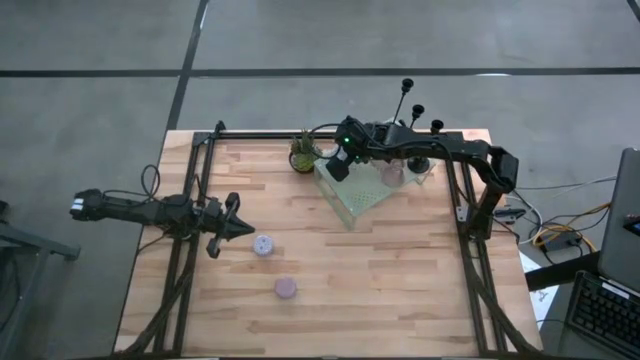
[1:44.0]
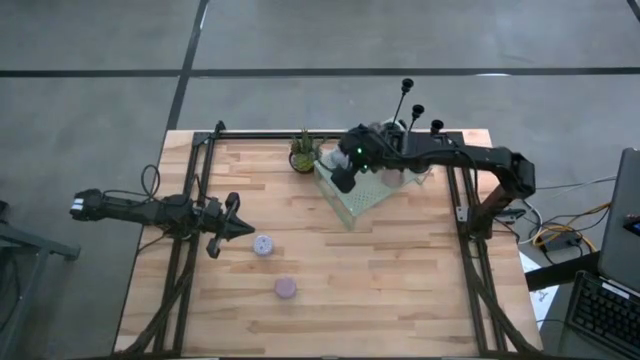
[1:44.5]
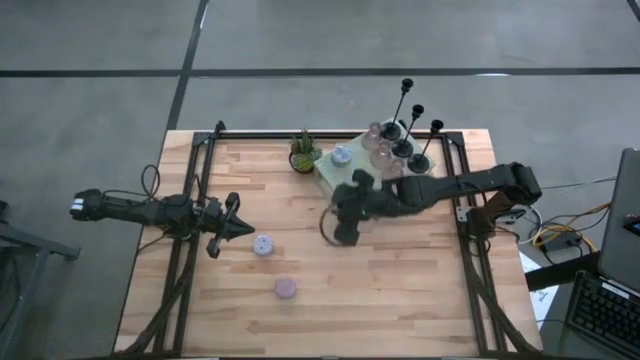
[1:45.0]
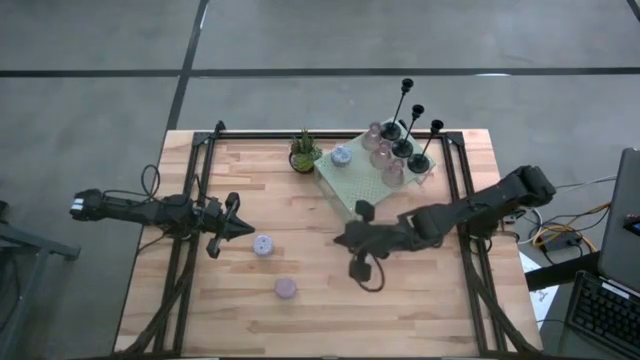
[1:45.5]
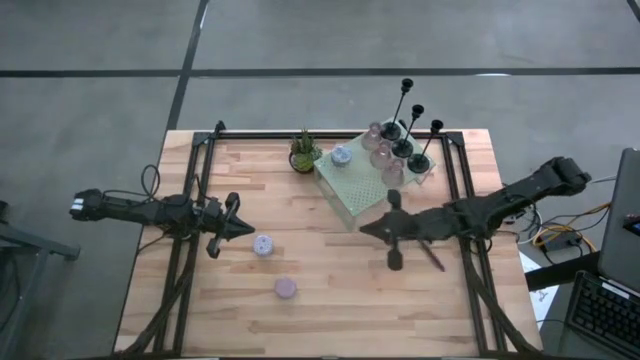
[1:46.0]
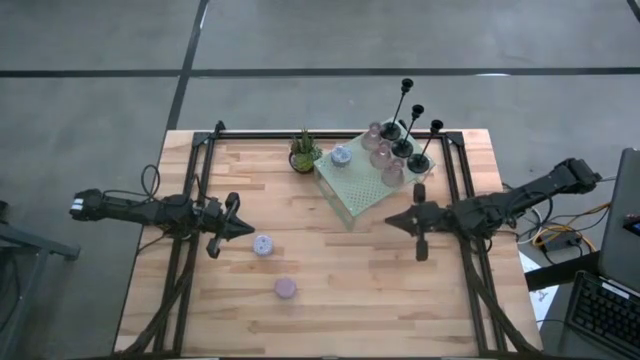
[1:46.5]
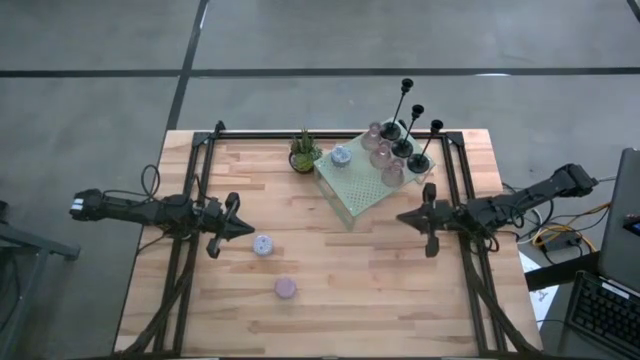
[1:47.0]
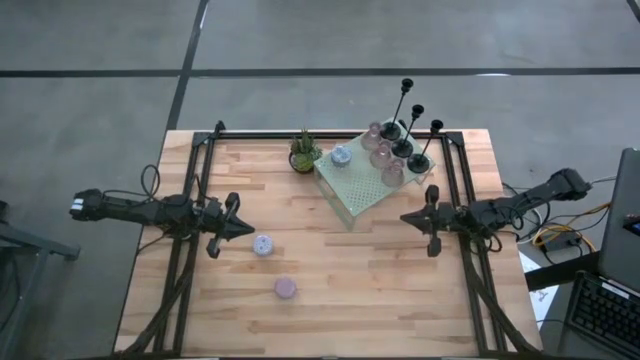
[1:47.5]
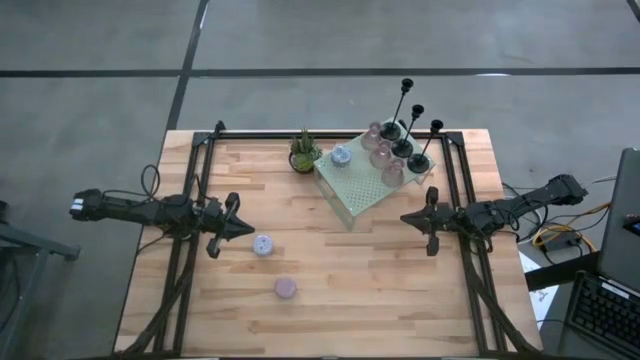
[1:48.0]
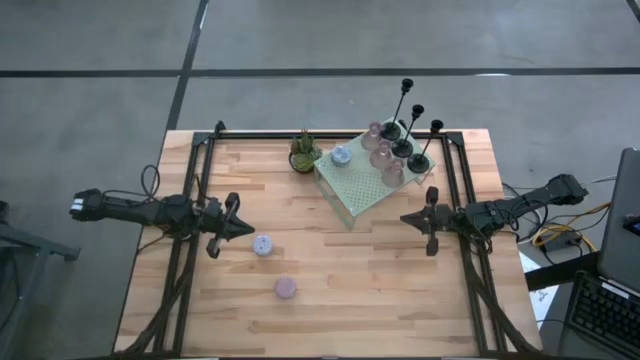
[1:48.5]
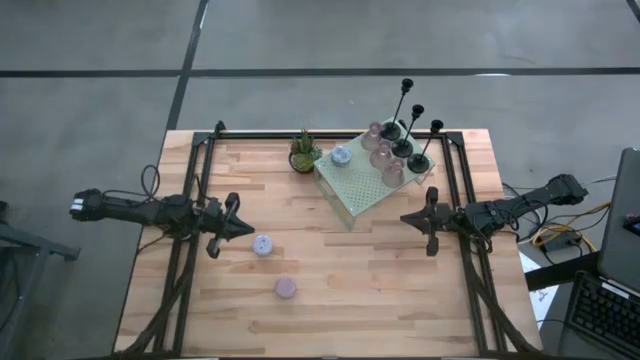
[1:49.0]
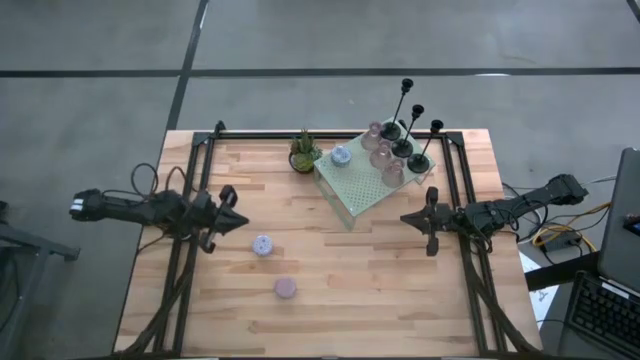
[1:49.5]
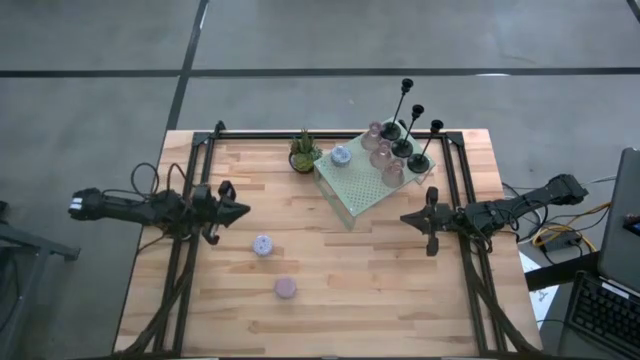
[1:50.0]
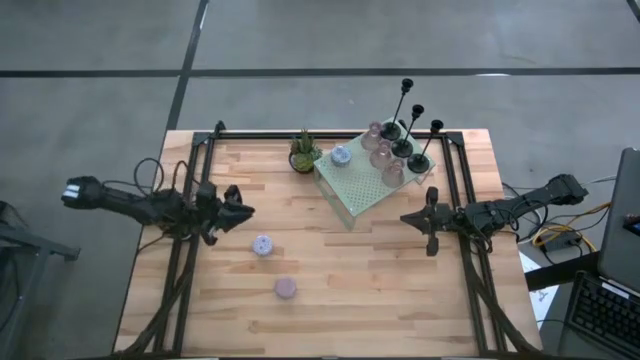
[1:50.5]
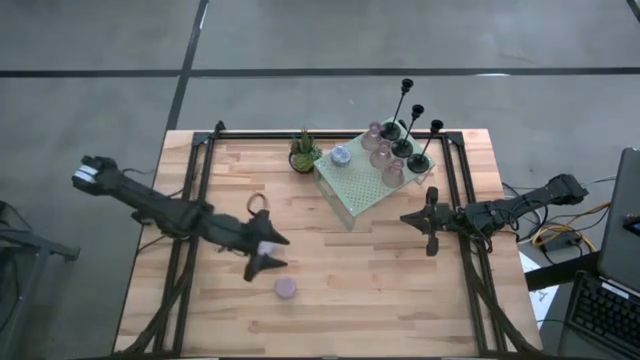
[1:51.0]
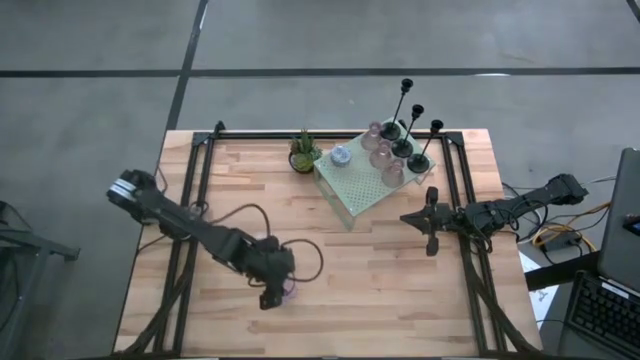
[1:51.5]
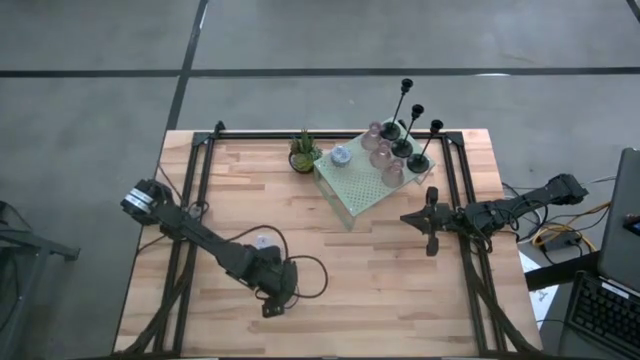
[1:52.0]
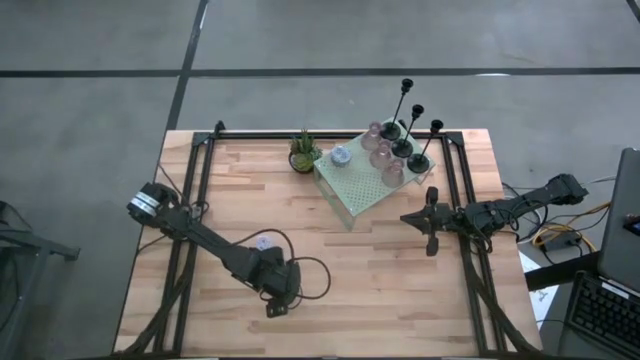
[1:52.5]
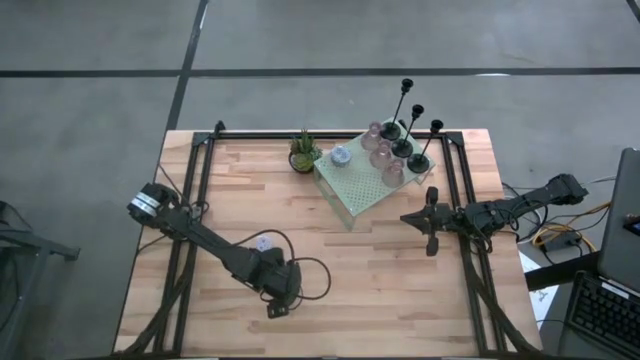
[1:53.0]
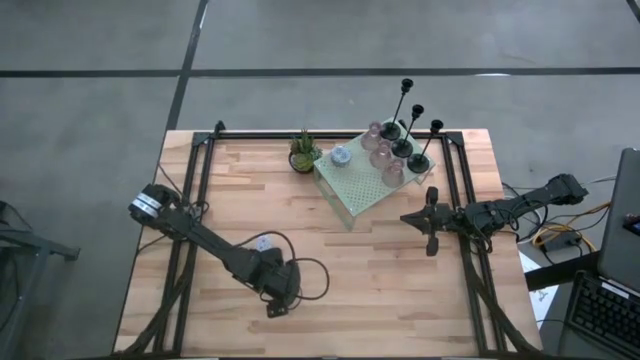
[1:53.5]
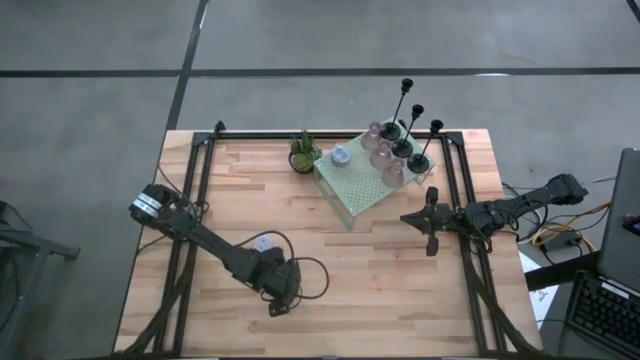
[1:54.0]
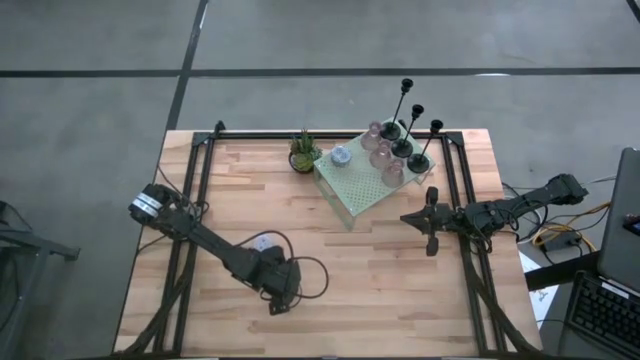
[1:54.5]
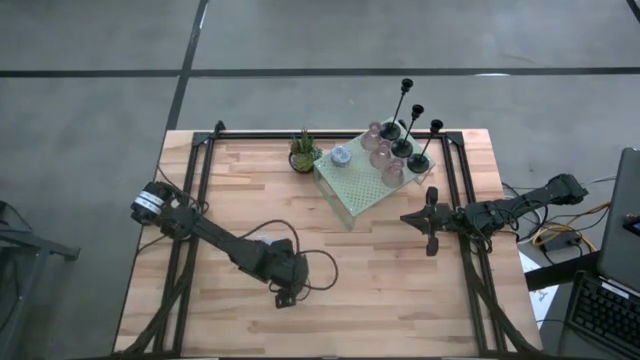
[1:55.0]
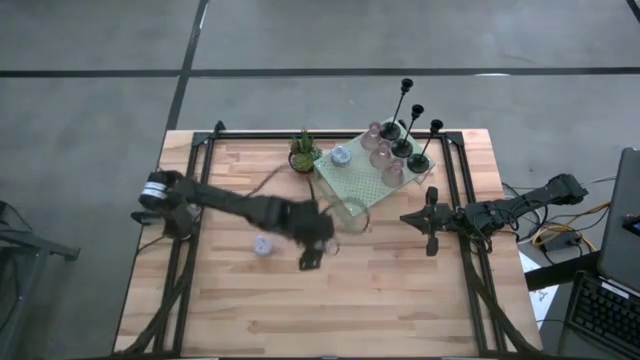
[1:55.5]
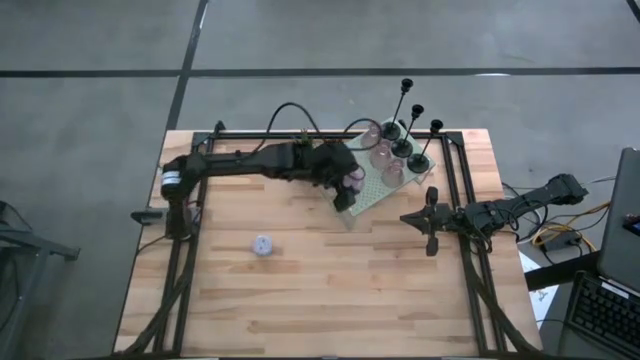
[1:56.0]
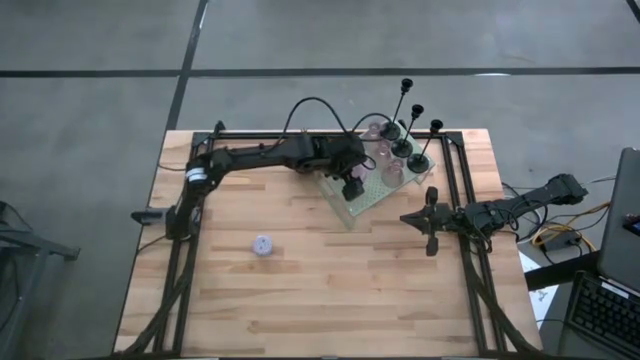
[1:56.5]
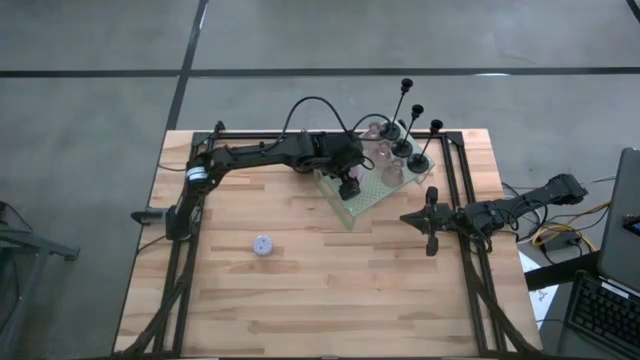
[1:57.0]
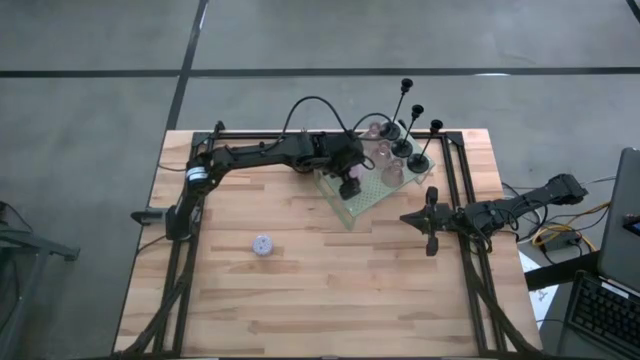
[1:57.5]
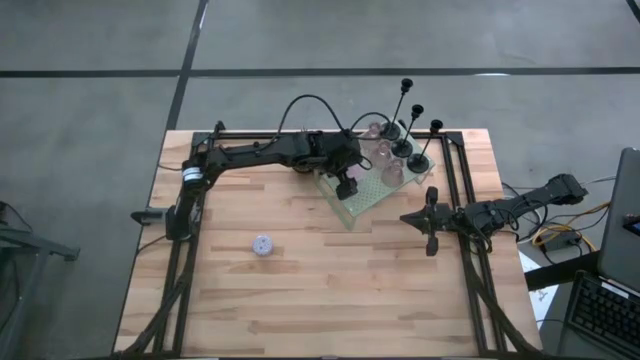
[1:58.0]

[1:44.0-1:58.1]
Task: Pick & Place candle stick holders
Put the pink scented candle on the shelf aligned with the other scented candle

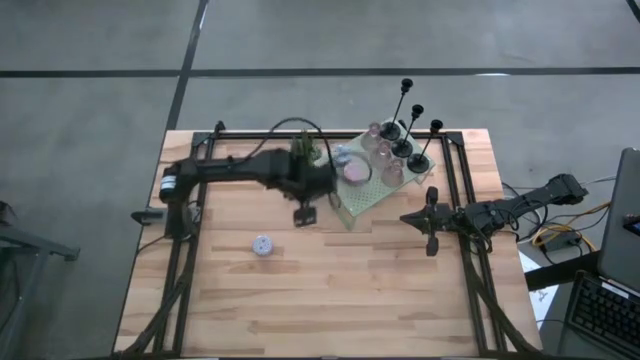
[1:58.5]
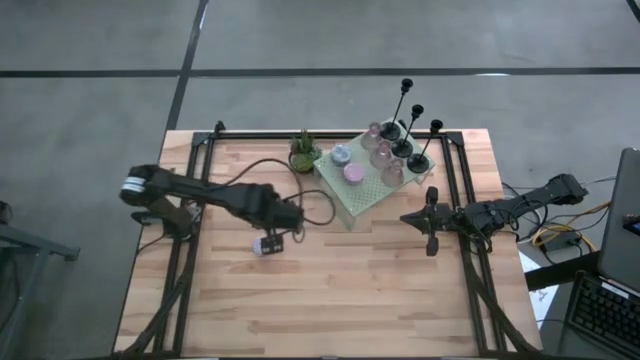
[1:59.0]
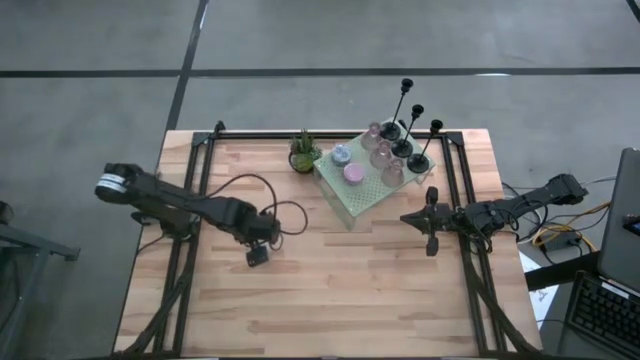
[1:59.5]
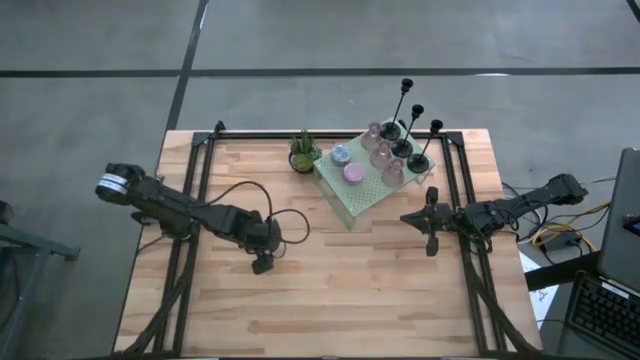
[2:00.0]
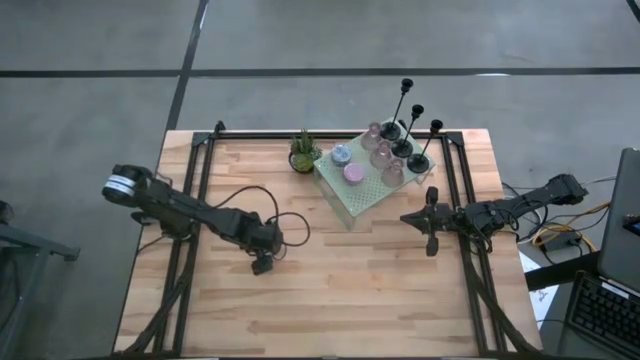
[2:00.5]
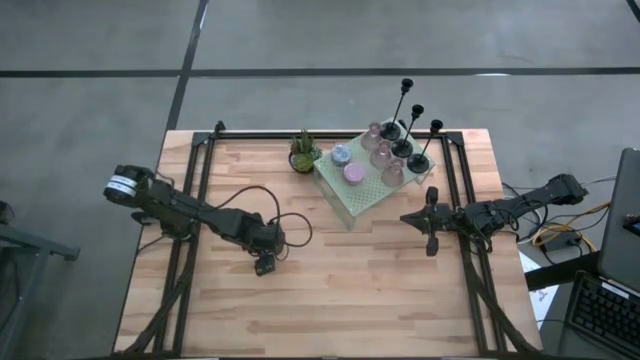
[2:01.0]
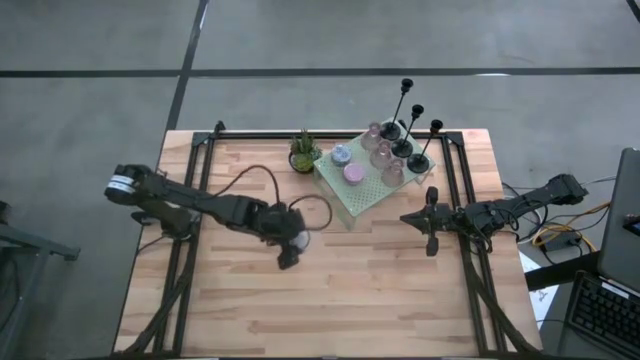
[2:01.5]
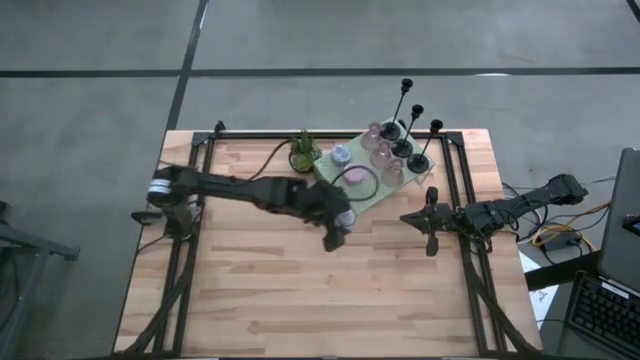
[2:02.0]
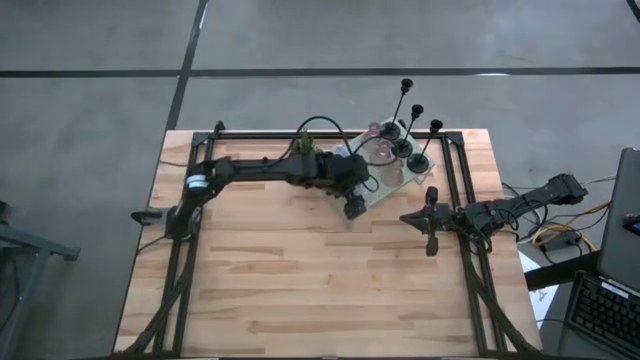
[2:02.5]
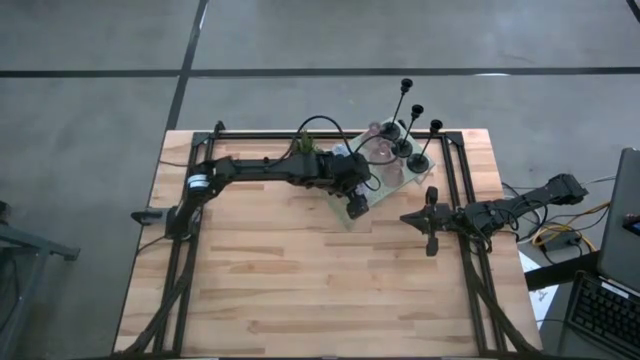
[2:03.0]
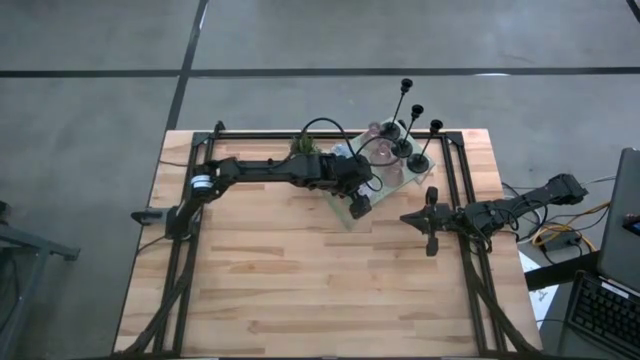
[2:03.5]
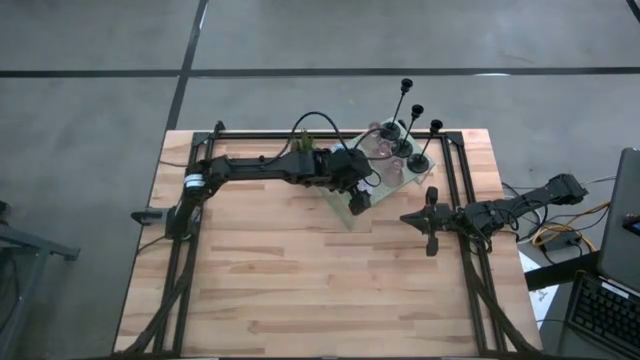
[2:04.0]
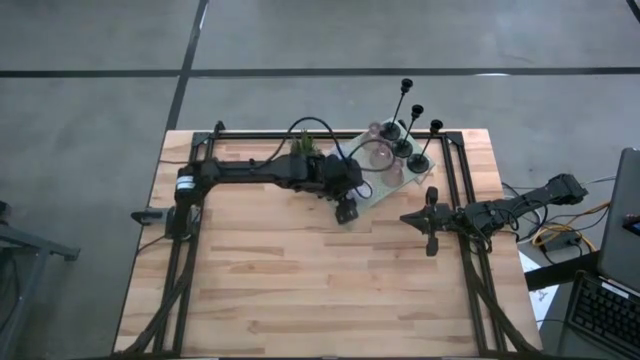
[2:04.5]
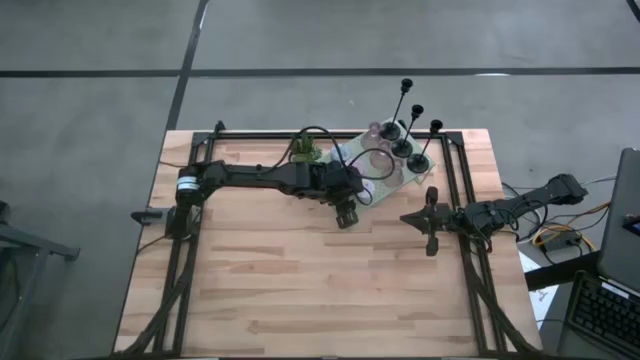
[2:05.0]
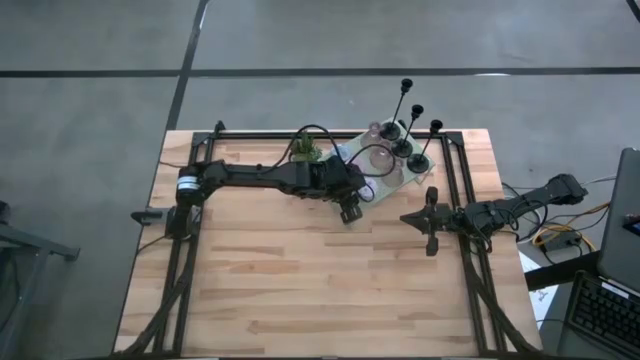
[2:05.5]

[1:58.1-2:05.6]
Put the red scented candle on the shelf aligned with the other scented candles

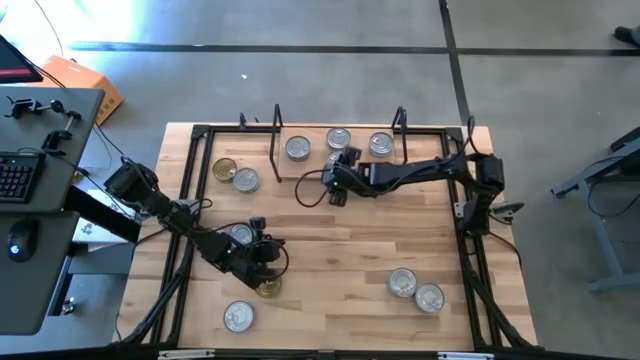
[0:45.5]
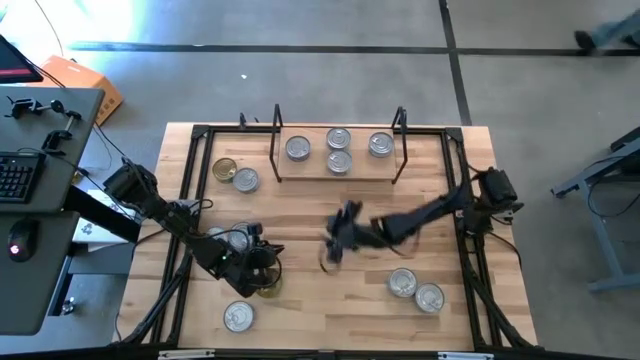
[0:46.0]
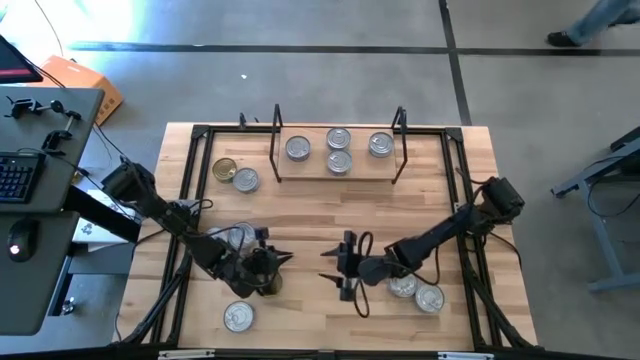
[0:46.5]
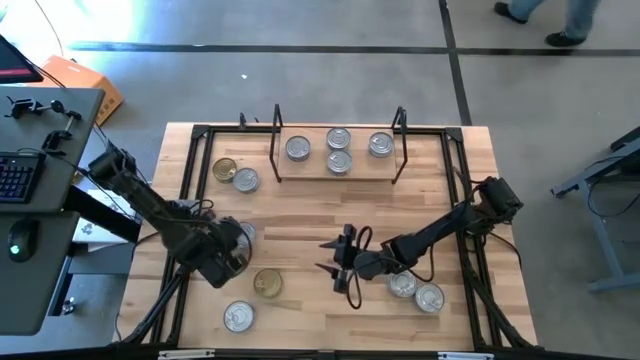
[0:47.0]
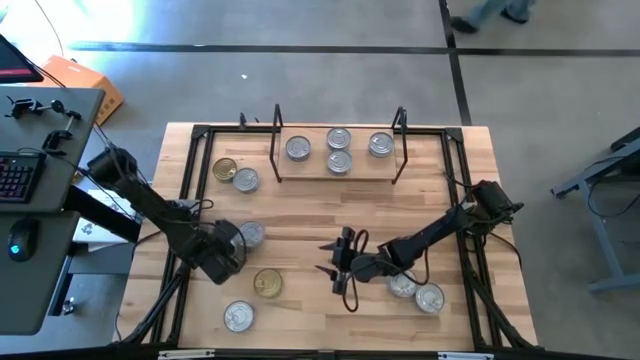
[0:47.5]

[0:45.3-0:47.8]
Task: Stack canned seafood by type on shelf
Adjust the blue tuna can
